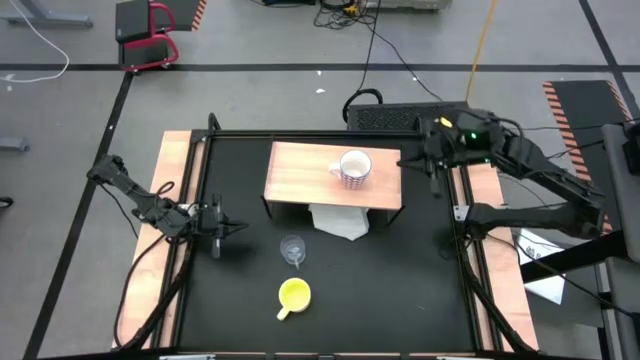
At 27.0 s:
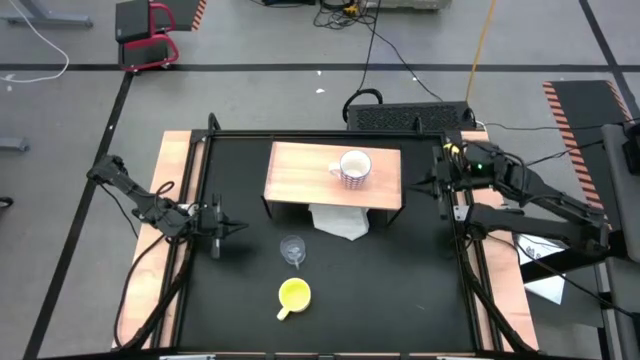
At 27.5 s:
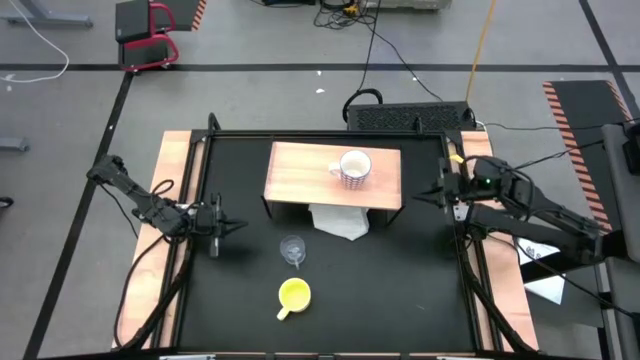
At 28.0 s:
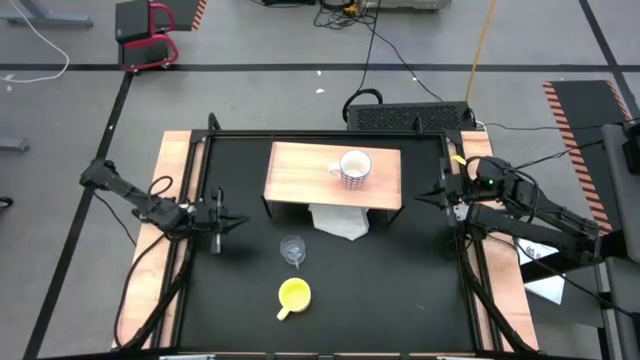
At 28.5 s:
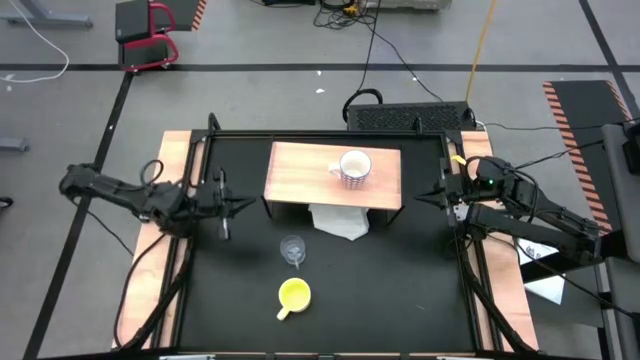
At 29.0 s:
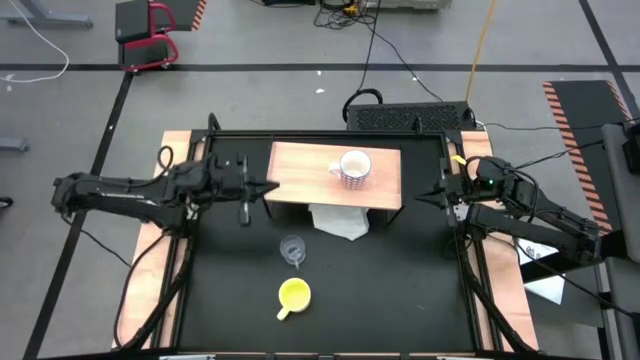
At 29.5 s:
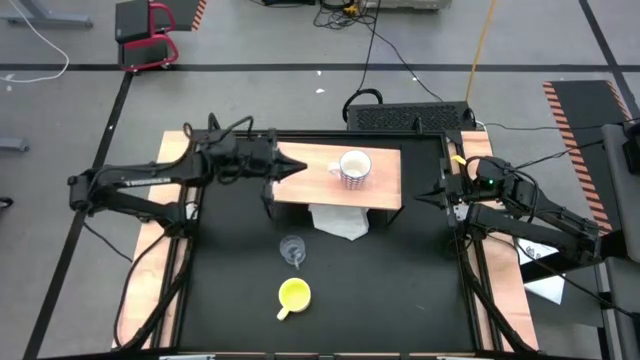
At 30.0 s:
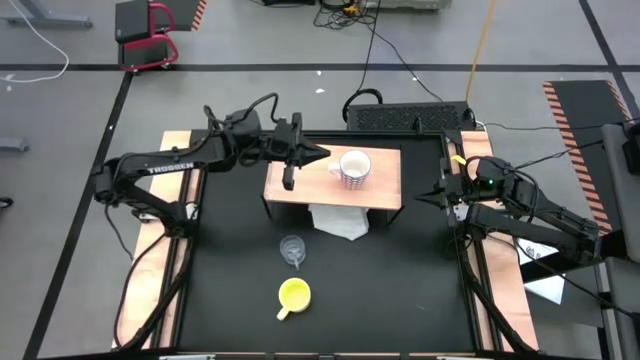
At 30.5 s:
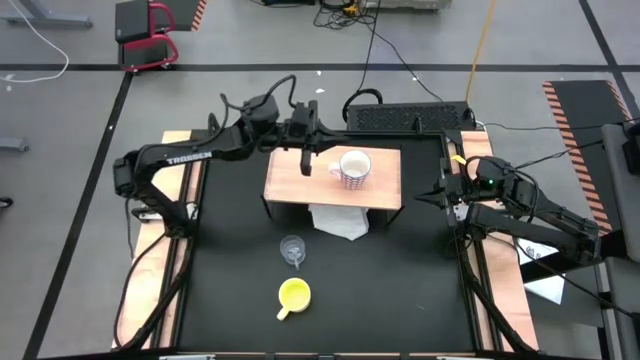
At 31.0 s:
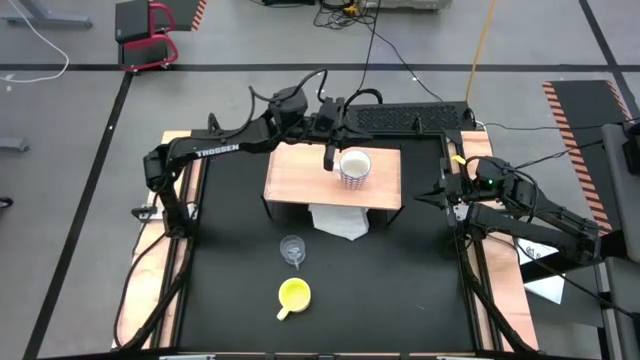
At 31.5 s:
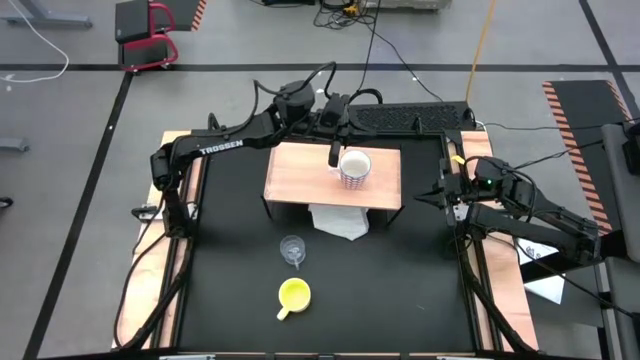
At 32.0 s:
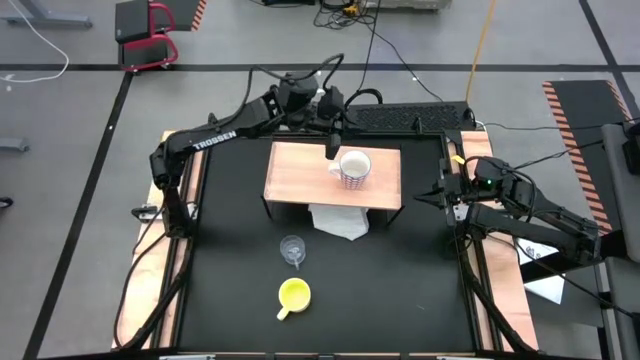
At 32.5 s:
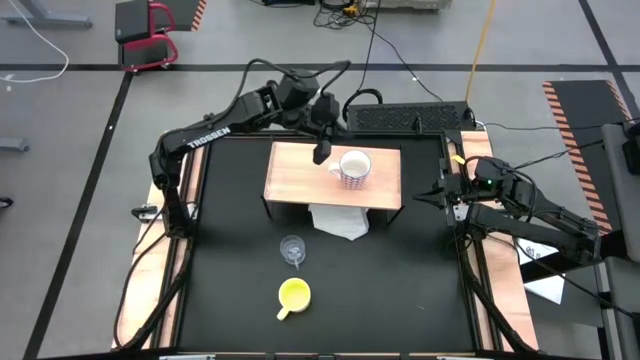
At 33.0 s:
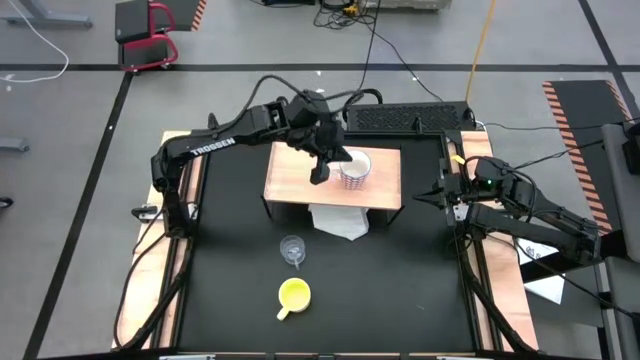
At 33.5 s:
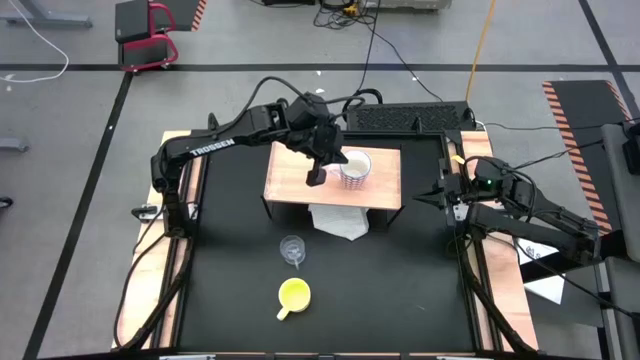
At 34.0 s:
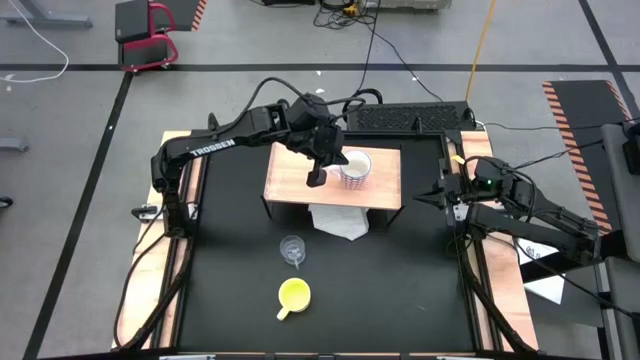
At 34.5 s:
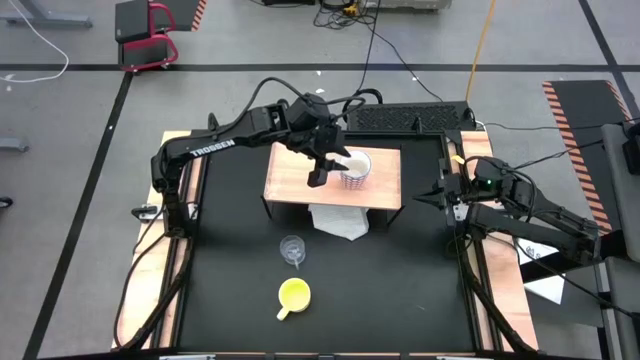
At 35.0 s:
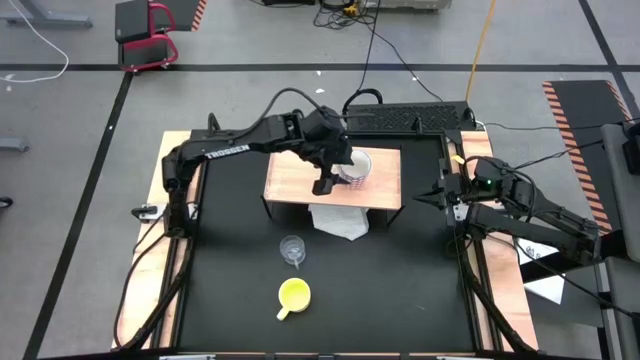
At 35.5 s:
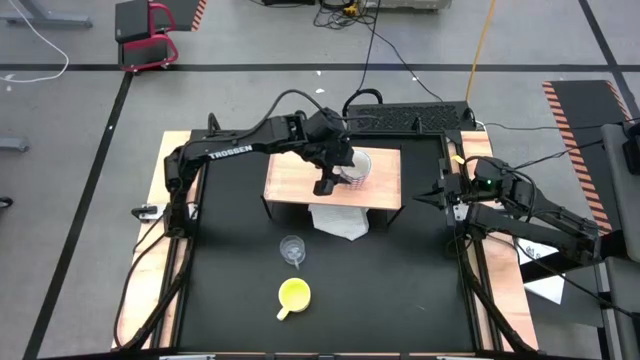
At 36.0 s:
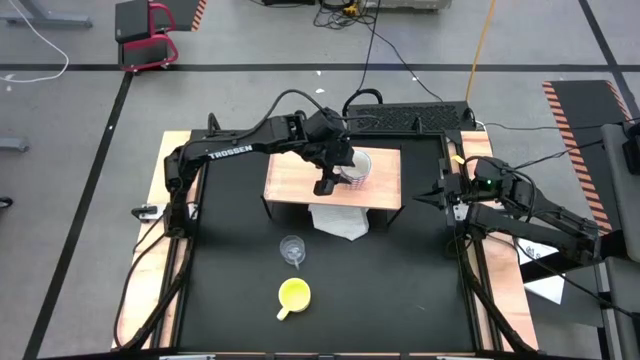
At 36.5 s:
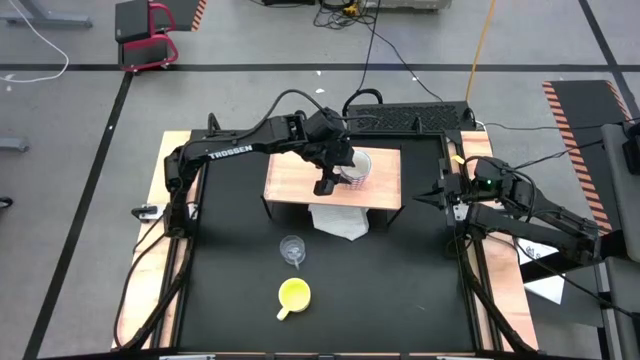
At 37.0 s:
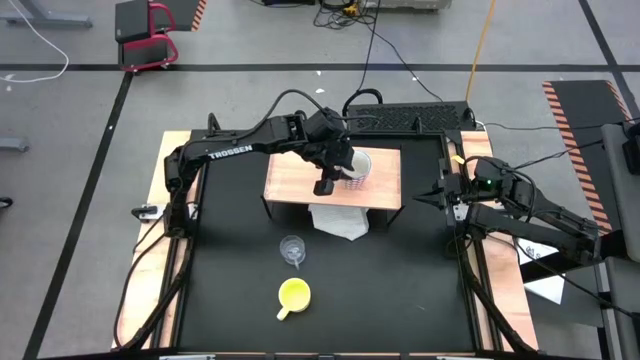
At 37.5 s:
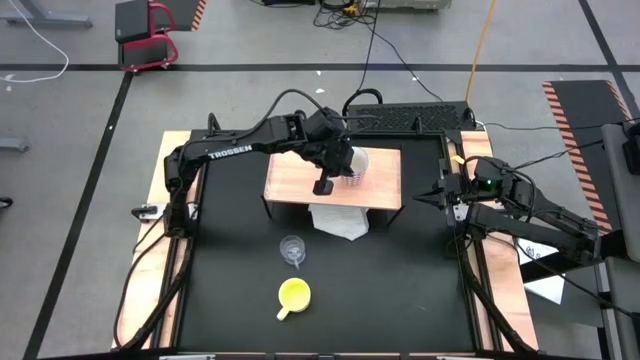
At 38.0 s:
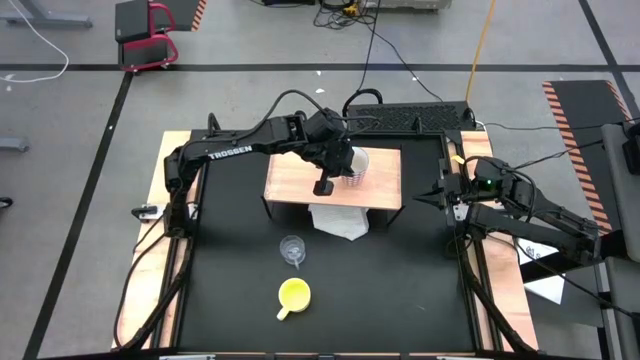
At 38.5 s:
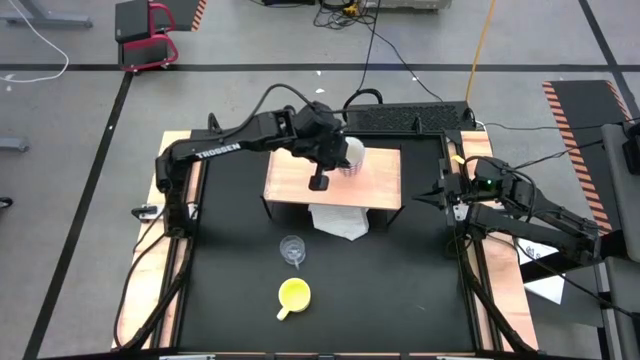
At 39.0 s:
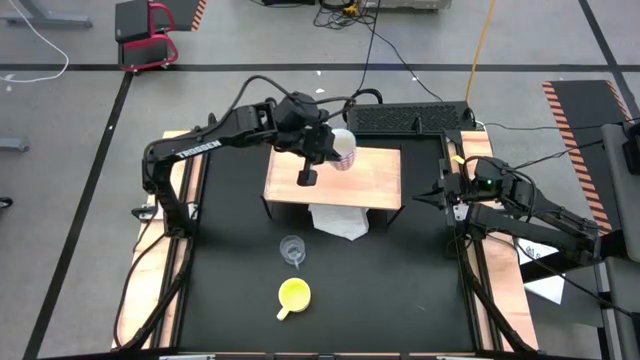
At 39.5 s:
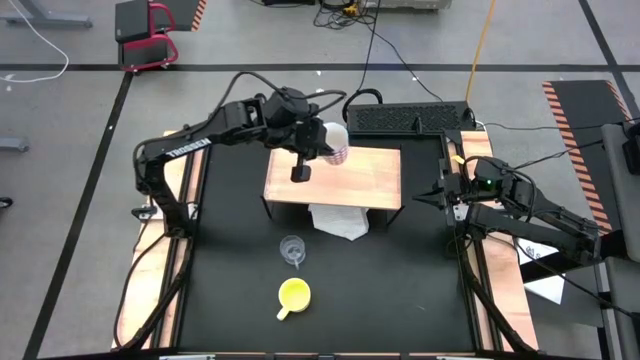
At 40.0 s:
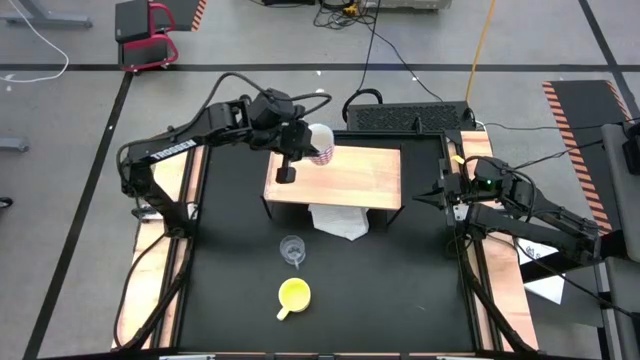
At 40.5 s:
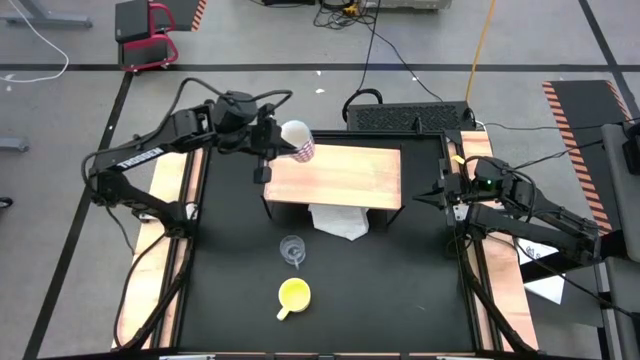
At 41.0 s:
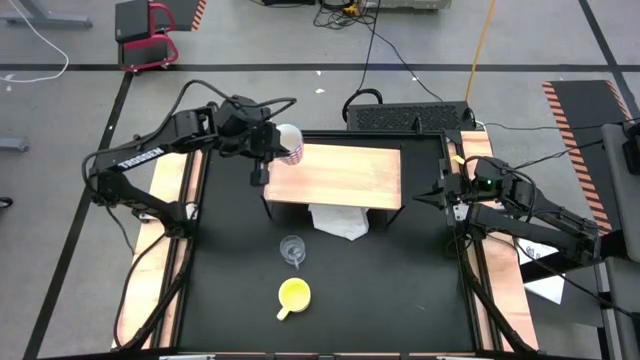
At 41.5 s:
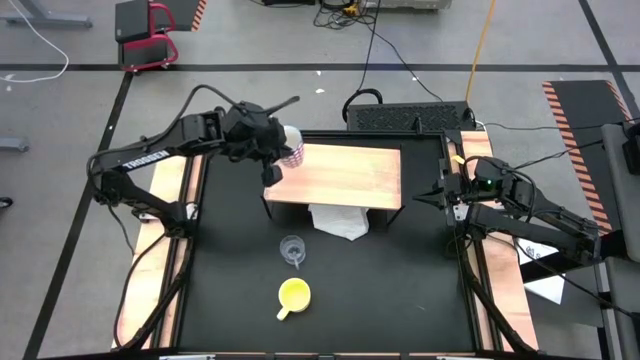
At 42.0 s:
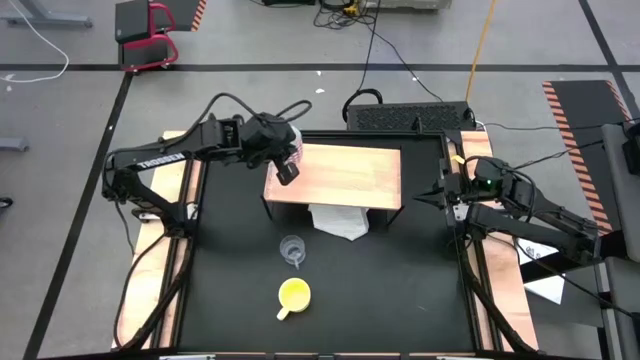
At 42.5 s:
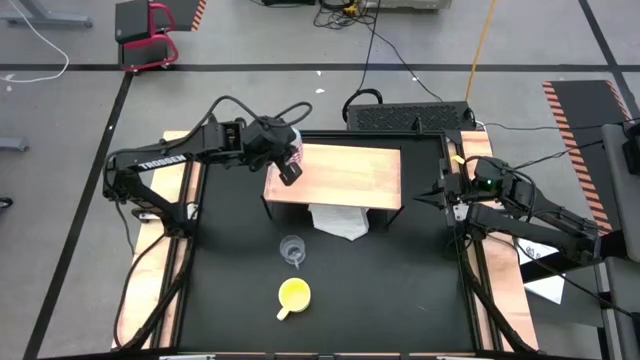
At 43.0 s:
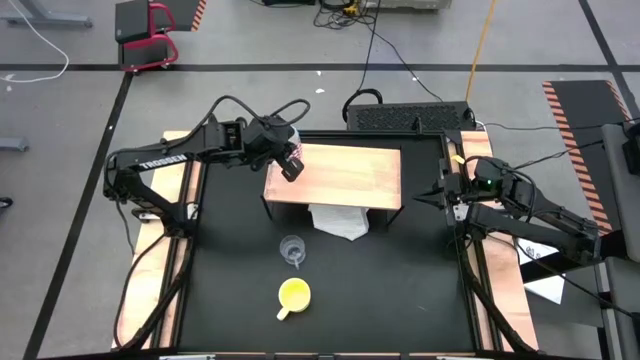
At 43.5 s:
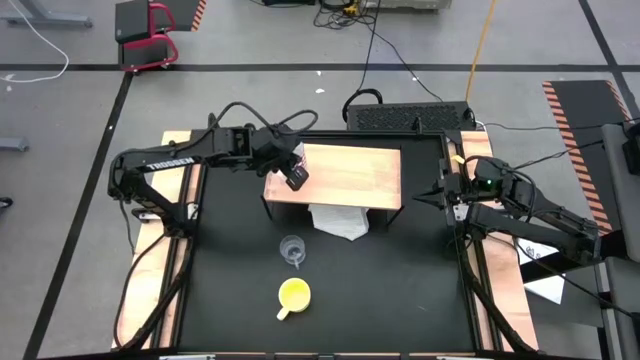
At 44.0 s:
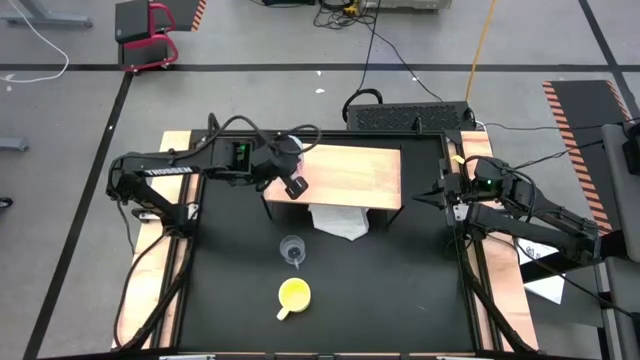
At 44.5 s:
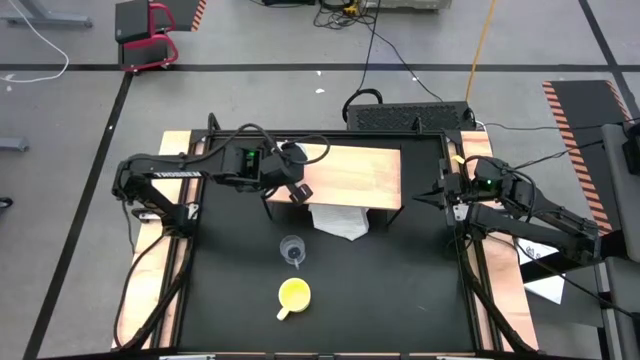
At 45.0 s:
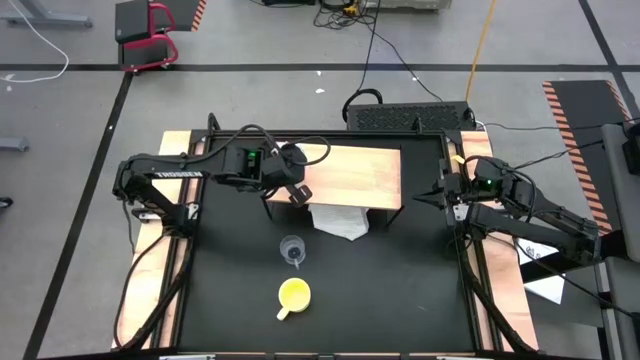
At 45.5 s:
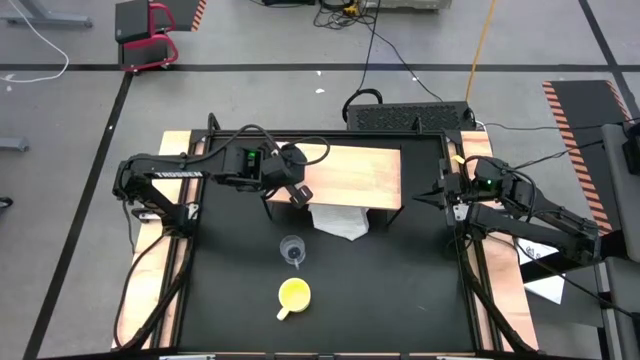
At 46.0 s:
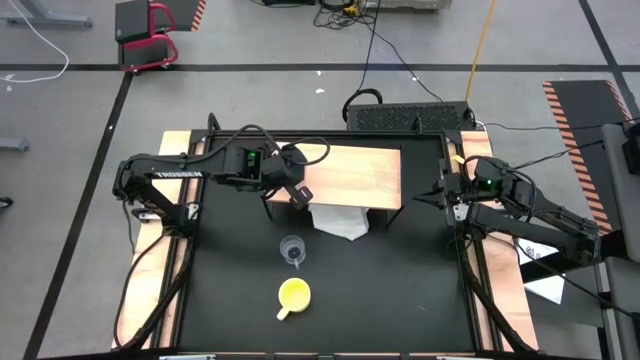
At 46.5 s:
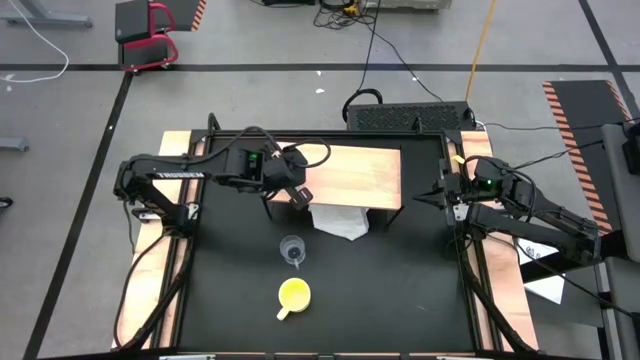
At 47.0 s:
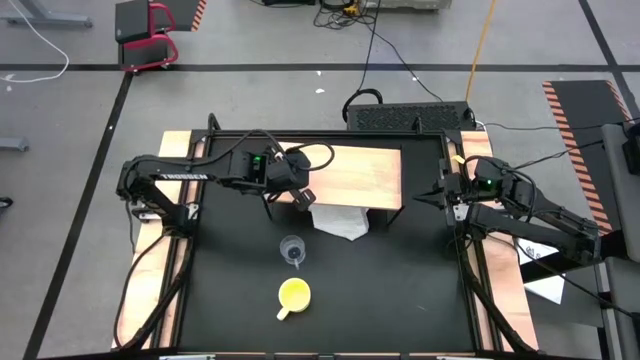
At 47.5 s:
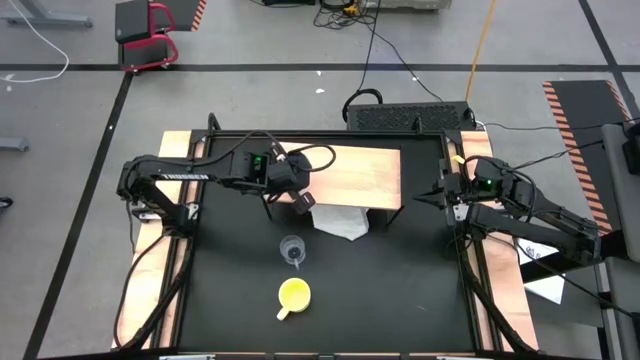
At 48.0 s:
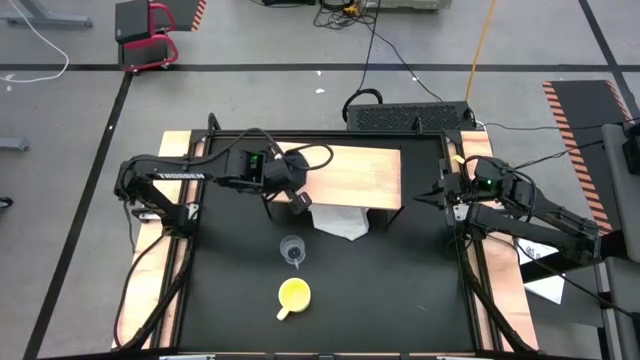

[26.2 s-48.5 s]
Task: Stack small to large cups/mugs on shelf
Put the red mug on the shelf
